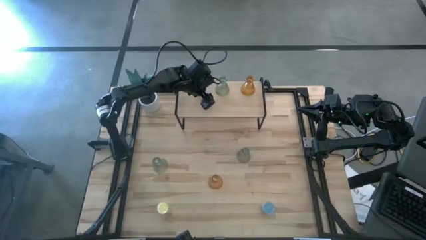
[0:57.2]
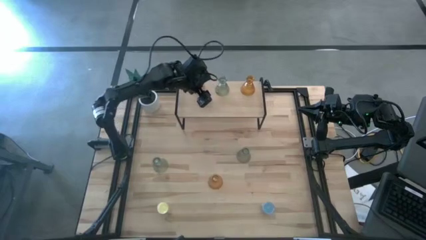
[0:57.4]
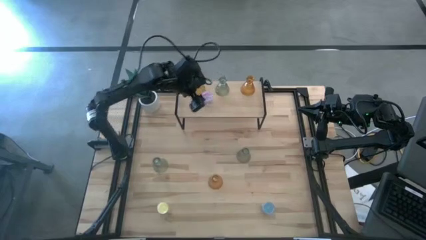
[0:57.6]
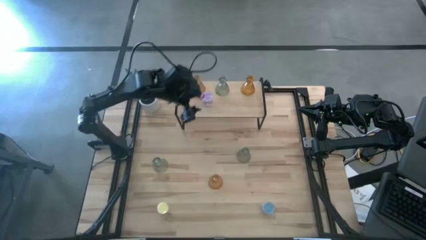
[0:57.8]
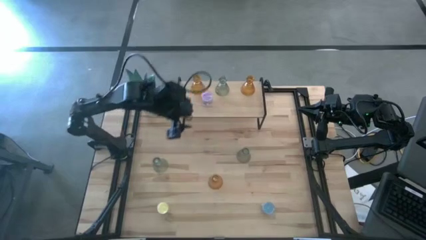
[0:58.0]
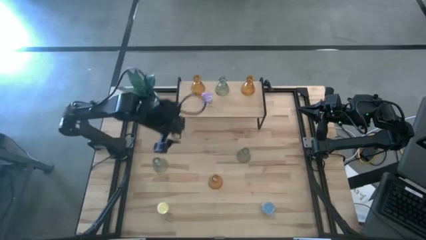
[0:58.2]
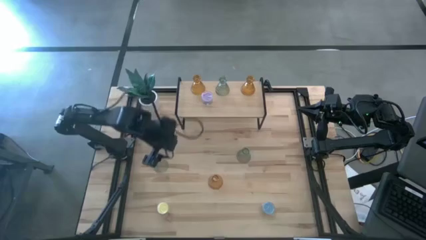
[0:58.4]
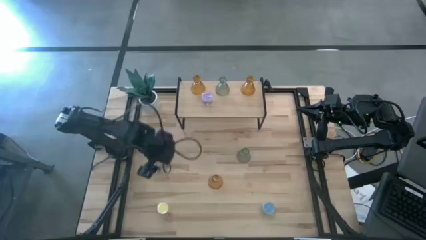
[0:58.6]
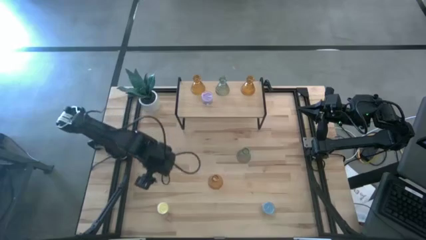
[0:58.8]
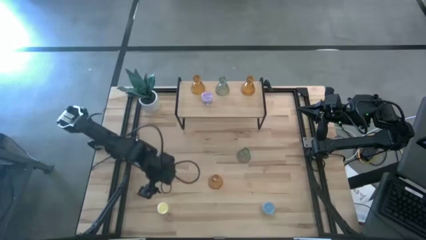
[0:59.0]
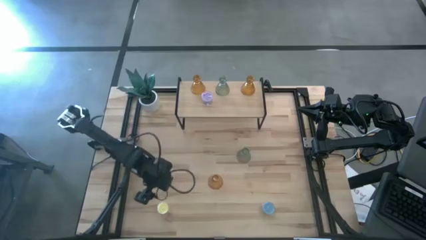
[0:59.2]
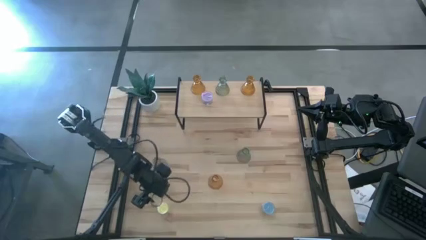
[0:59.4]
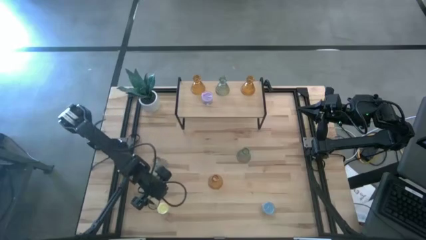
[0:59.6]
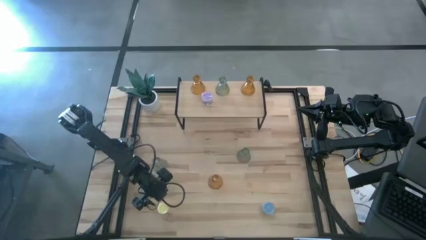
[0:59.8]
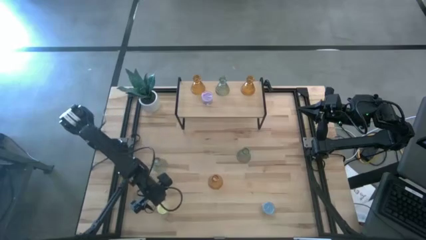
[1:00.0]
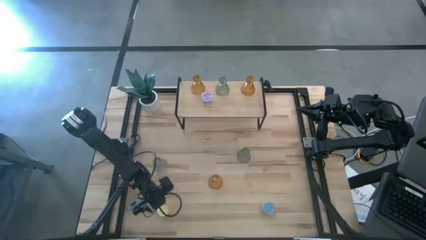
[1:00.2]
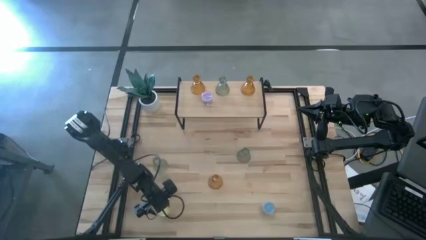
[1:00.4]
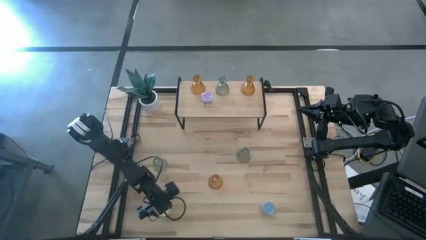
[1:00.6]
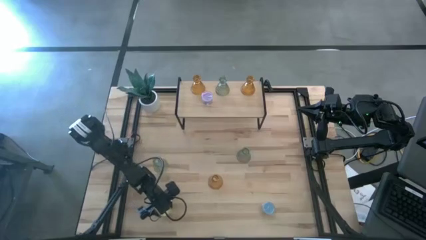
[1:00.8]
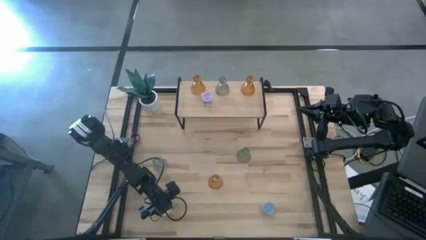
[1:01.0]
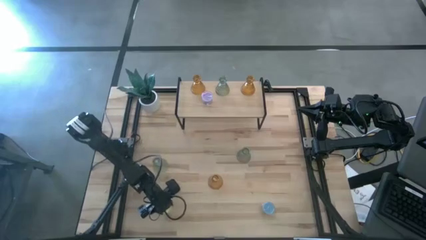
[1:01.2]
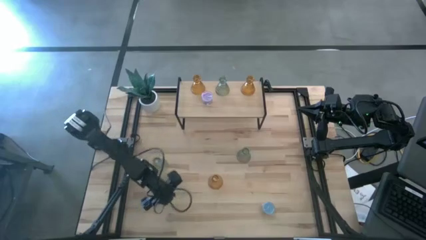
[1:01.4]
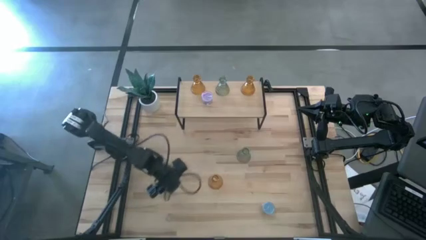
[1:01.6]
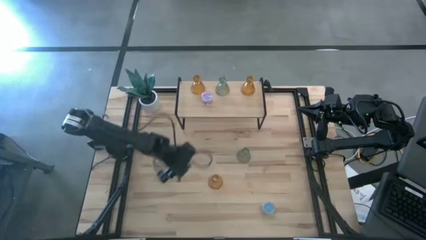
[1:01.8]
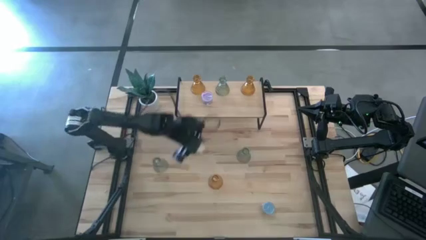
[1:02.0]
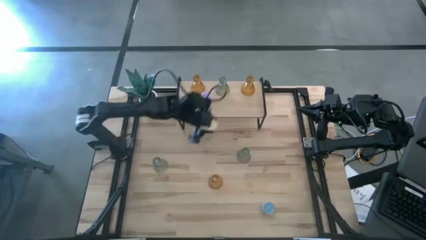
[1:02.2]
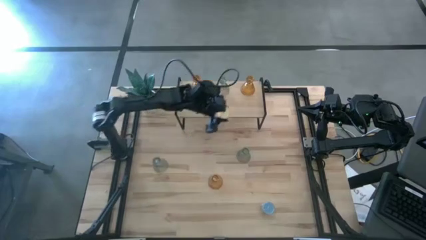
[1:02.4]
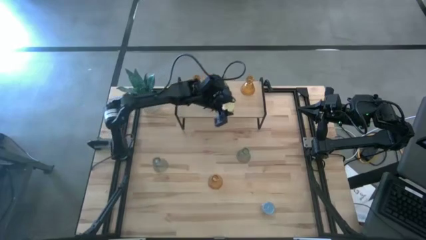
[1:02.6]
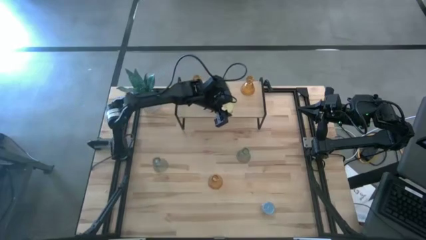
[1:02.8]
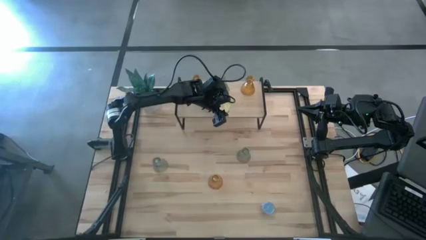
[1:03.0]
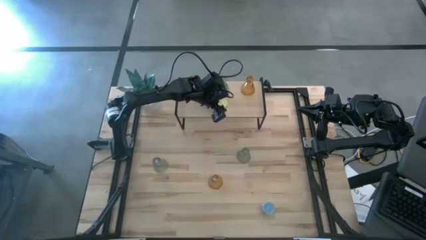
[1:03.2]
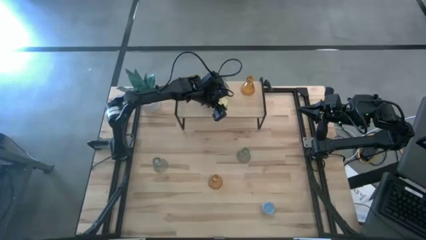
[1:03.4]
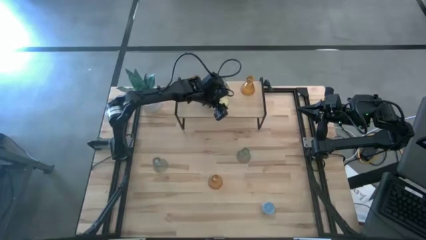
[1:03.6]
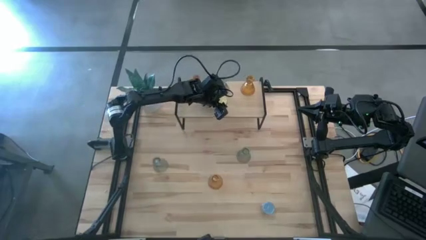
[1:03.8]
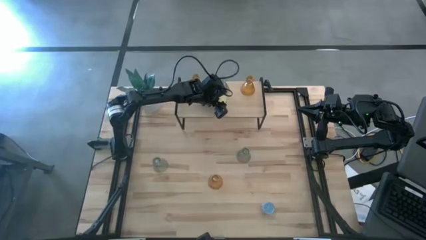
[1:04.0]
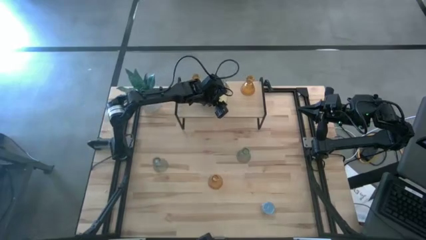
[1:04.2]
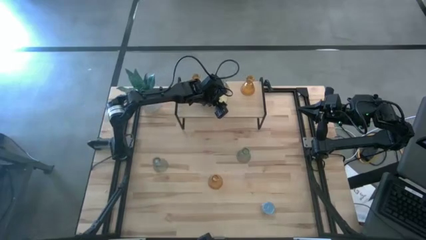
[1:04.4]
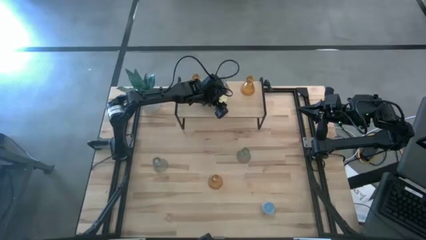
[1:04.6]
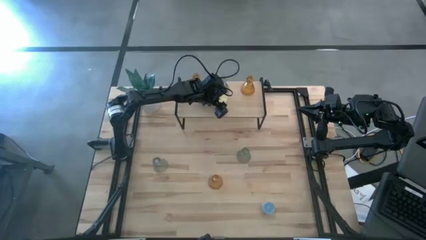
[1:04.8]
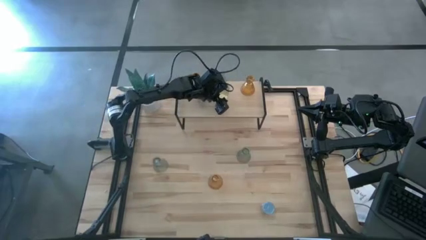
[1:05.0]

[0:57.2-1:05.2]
Task: Pick & Place candle stick holders
Put the yellow scented candle on the shelf

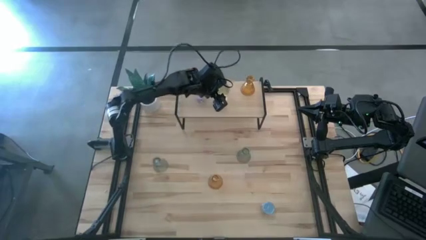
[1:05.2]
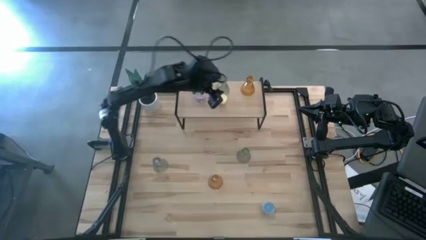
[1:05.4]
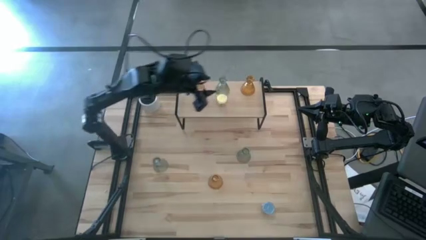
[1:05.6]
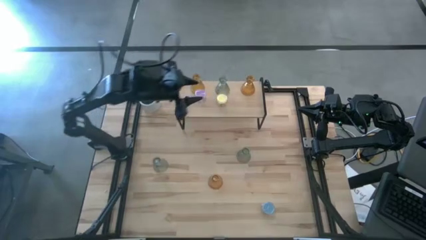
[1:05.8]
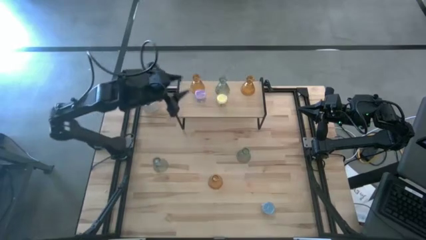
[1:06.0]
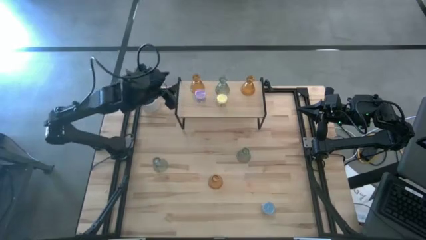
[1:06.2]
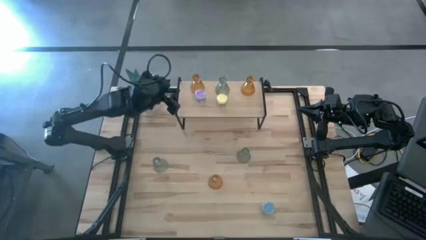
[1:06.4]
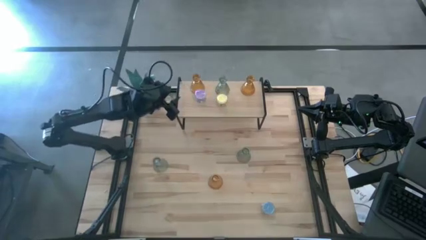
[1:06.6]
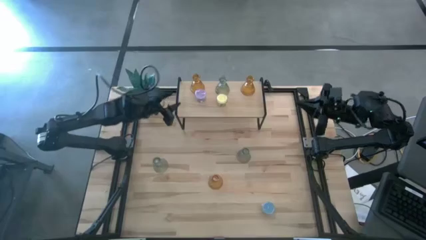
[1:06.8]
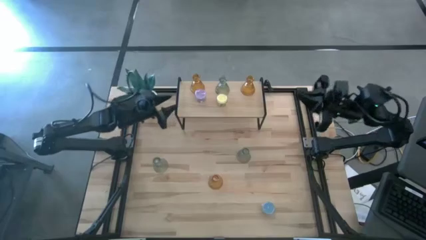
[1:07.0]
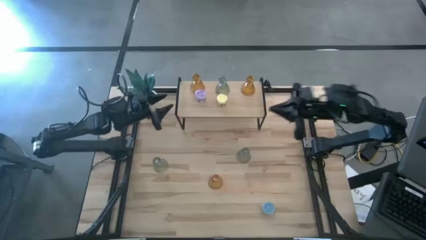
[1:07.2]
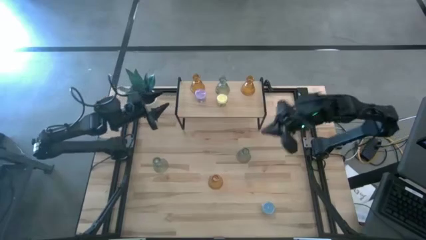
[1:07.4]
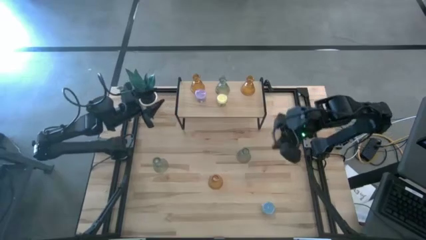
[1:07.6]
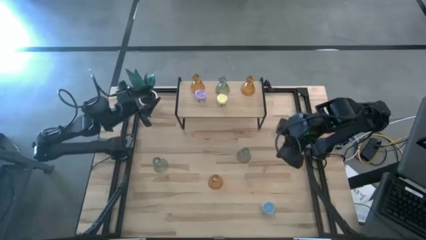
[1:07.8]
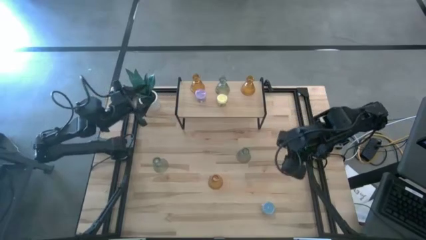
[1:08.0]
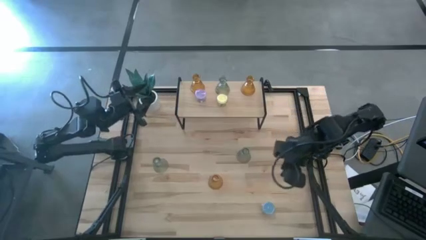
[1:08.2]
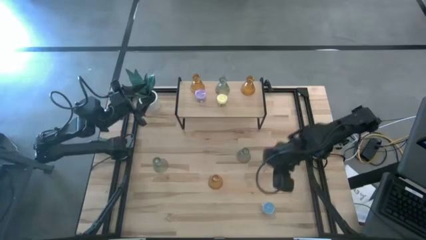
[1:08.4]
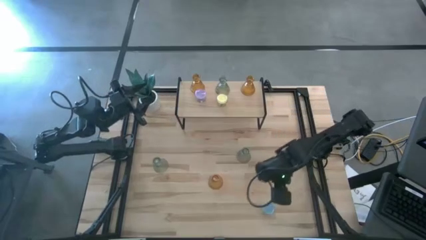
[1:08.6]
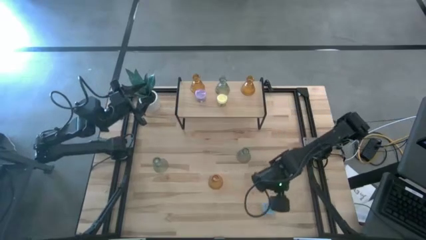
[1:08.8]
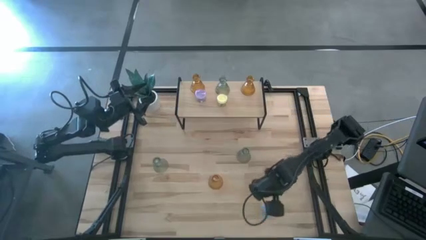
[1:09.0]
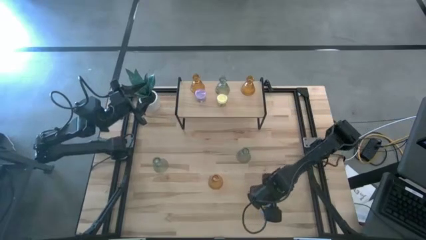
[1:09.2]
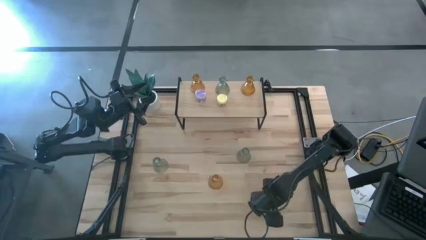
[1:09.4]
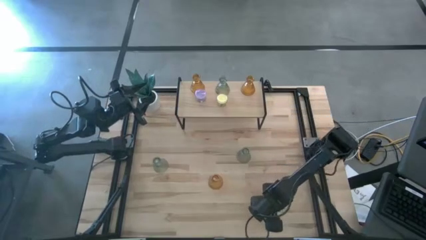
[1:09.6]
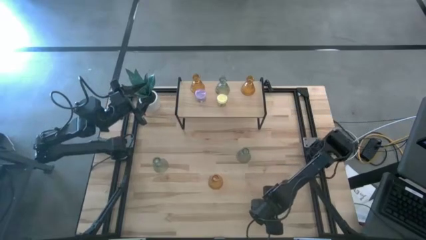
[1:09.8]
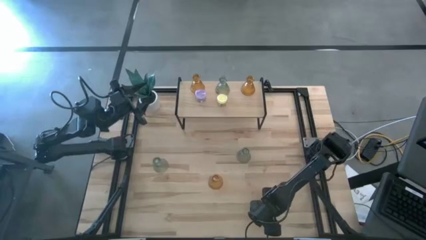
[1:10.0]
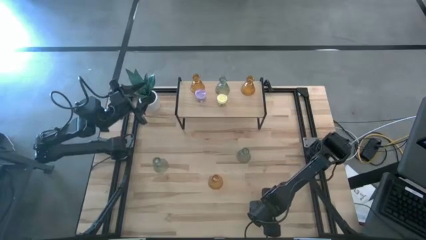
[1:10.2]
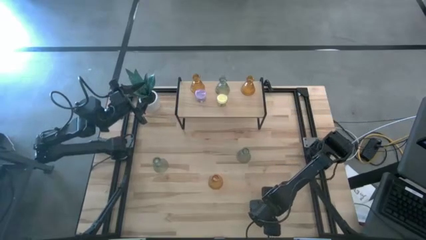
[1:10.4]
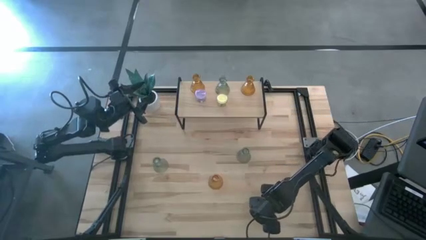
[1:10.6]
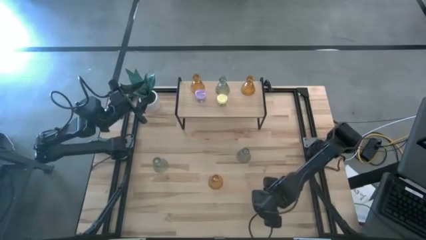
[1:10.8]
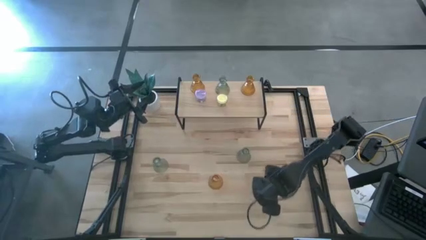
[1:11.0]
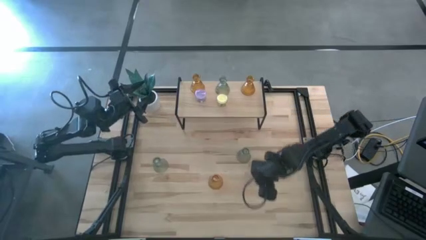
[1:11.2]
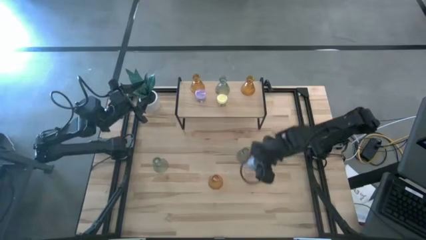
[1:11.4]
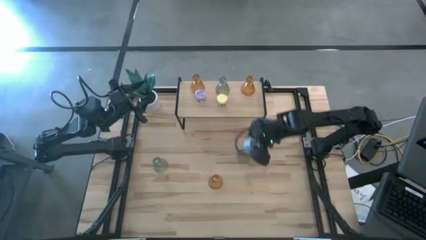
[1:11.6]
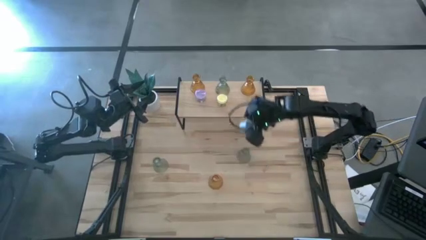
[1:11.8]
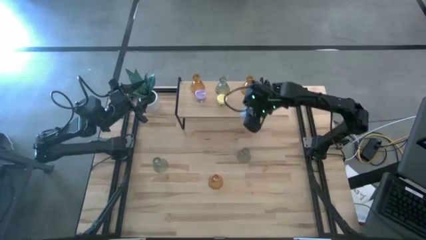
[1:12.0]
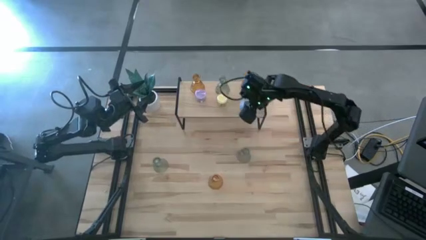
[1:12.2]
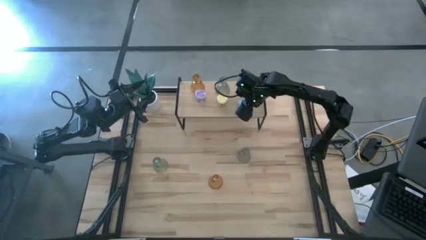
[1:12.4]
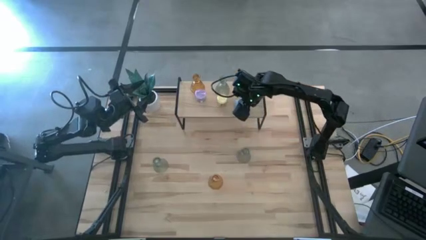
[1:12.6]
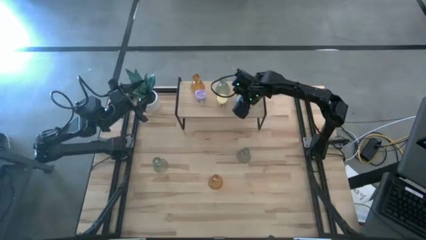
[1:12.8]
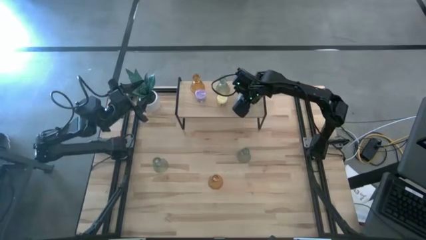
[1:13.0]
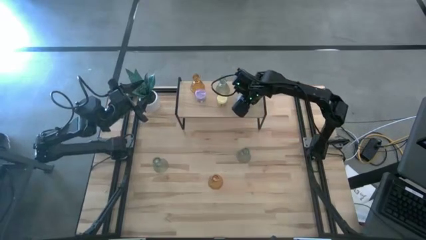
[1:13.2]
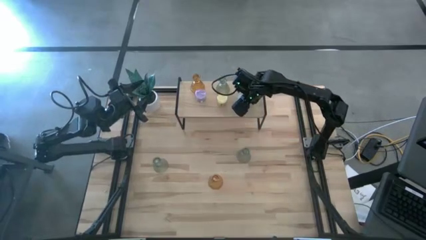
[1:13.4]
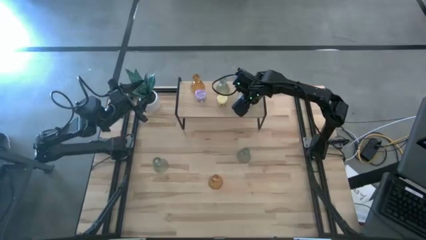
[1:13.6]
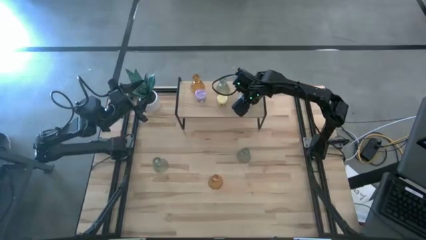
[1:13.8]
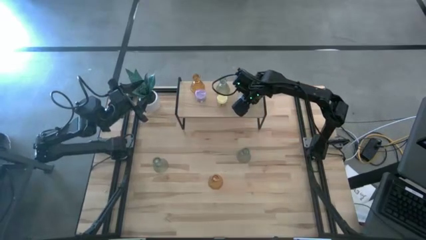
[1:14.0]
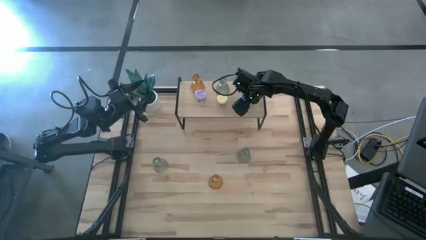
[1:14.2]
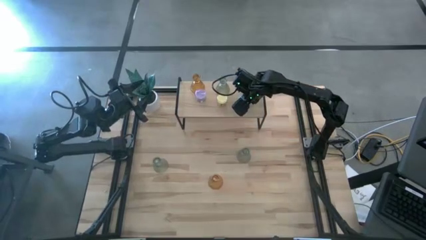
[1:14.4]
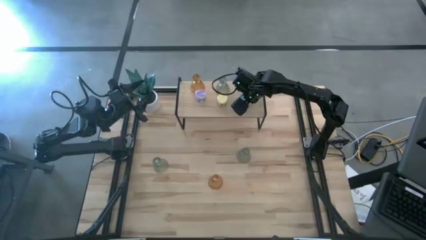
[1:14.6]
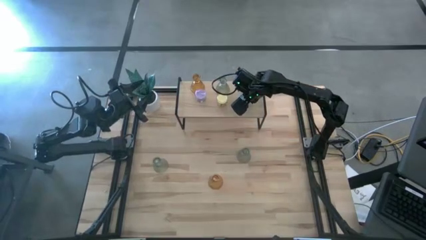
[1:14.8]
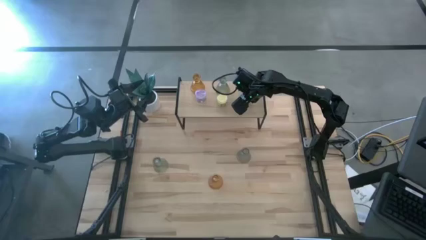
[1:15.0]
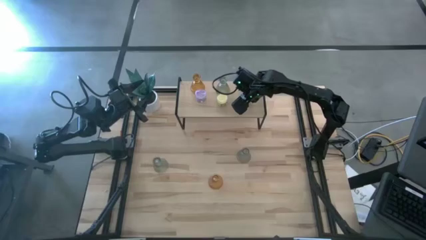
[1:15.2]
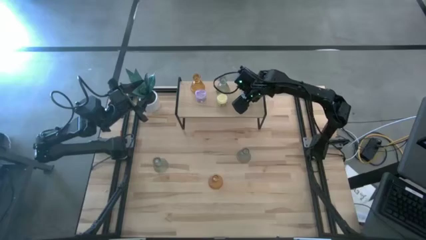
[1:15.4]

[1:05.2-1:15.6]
Put the blue scented candle on the shelf
